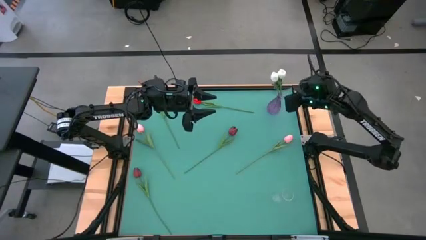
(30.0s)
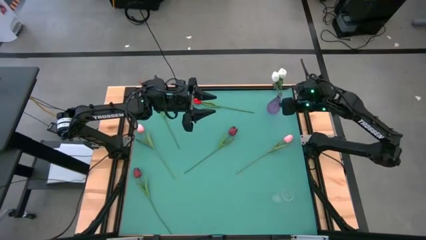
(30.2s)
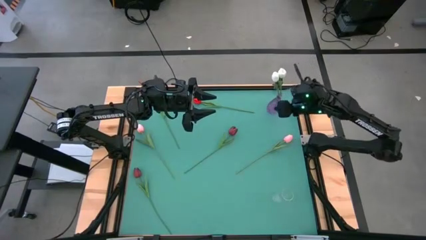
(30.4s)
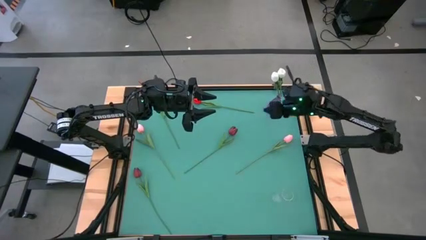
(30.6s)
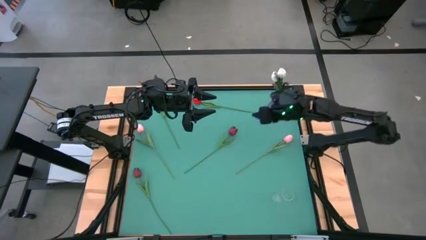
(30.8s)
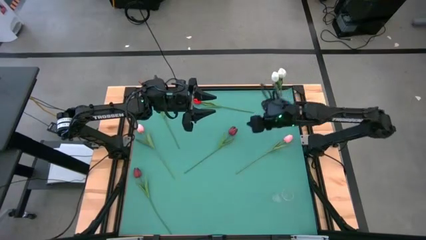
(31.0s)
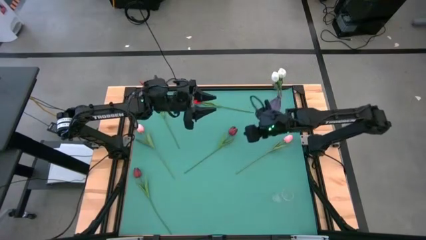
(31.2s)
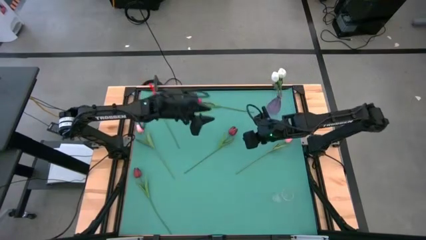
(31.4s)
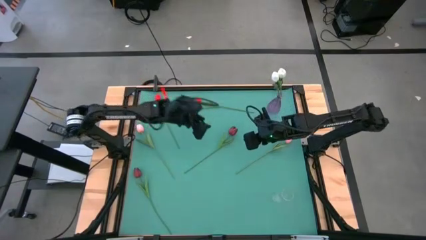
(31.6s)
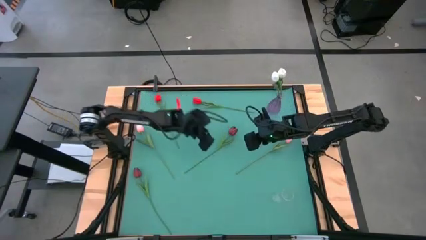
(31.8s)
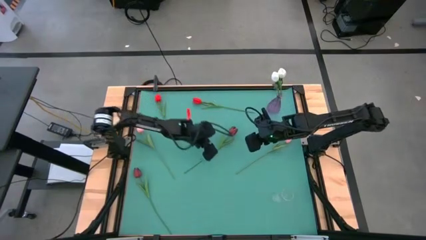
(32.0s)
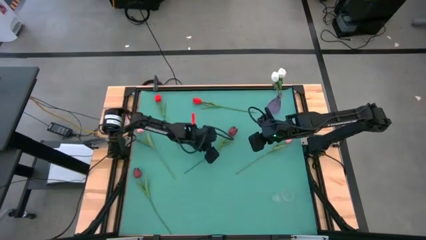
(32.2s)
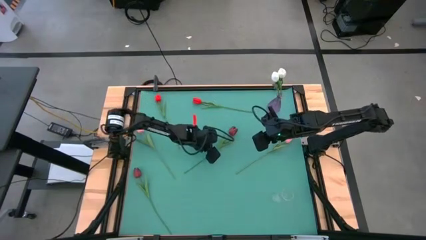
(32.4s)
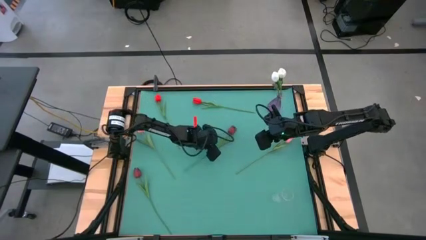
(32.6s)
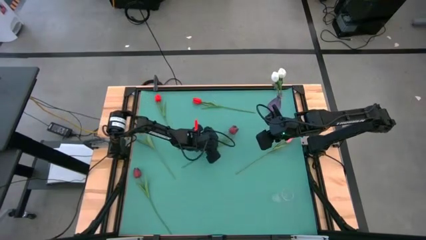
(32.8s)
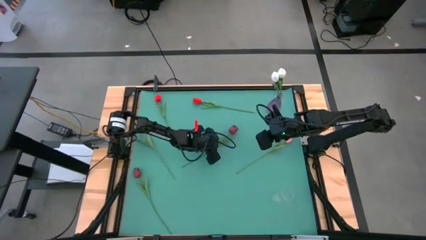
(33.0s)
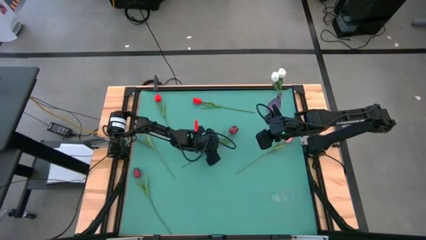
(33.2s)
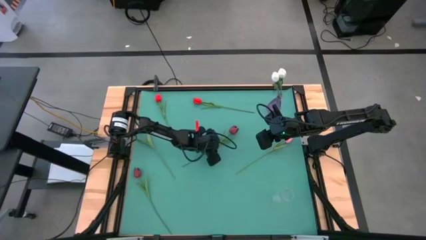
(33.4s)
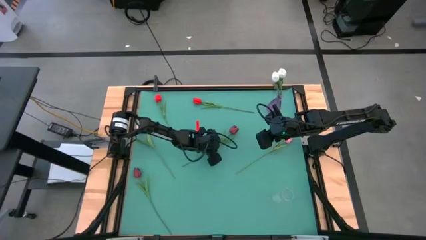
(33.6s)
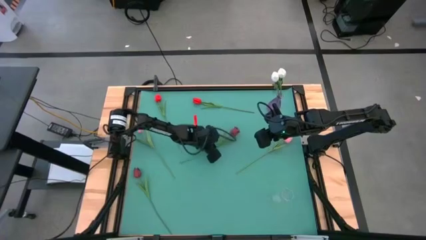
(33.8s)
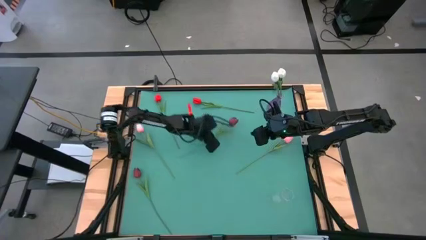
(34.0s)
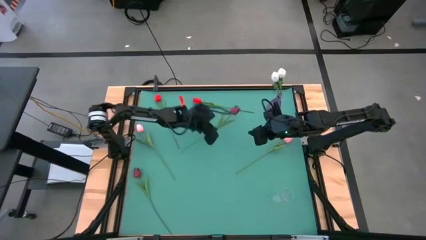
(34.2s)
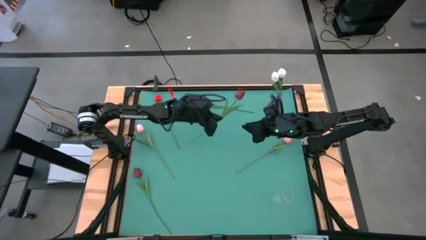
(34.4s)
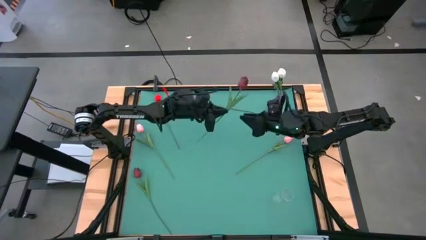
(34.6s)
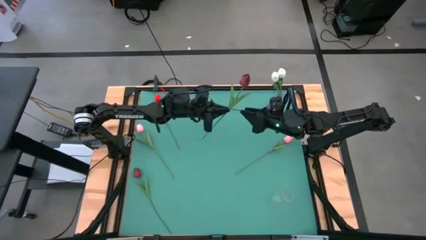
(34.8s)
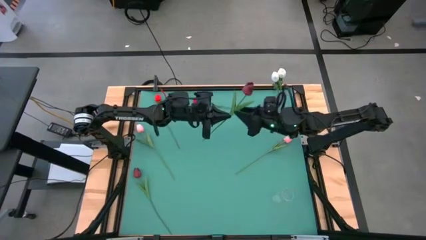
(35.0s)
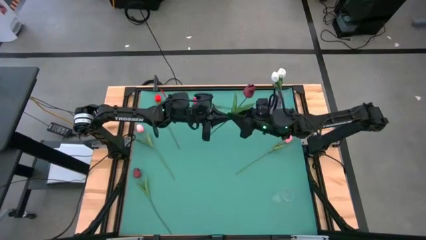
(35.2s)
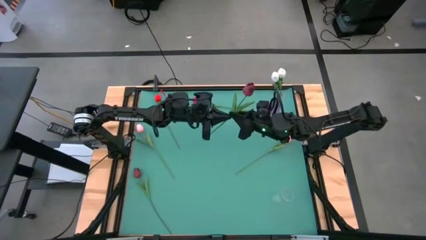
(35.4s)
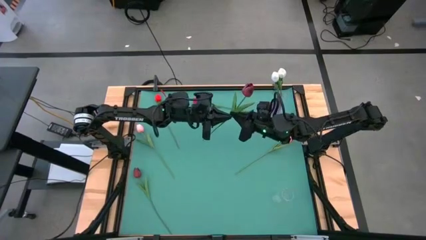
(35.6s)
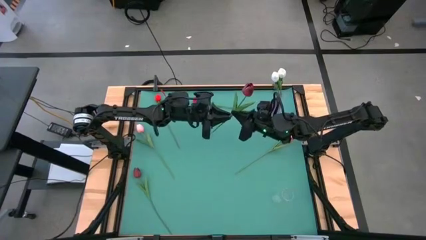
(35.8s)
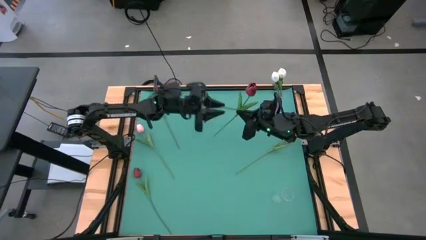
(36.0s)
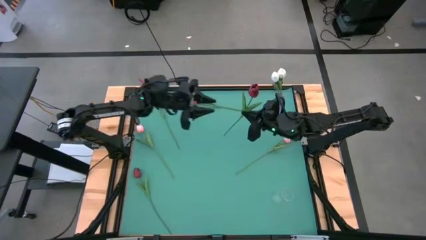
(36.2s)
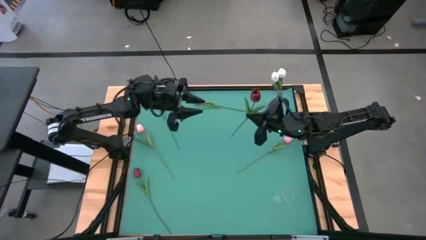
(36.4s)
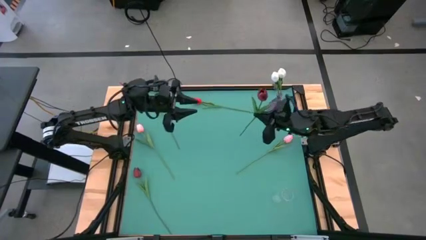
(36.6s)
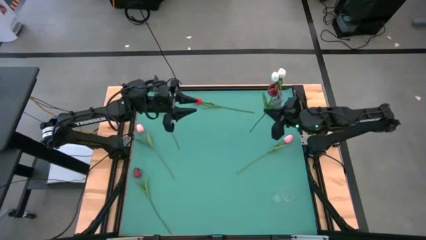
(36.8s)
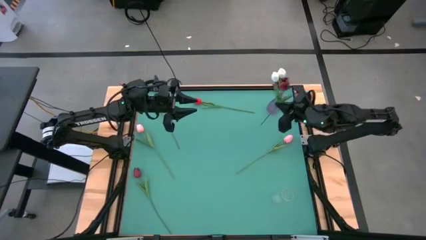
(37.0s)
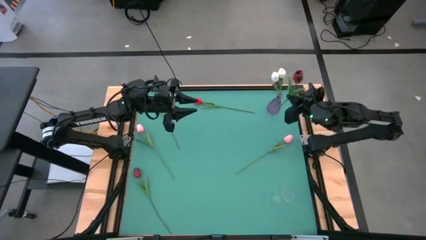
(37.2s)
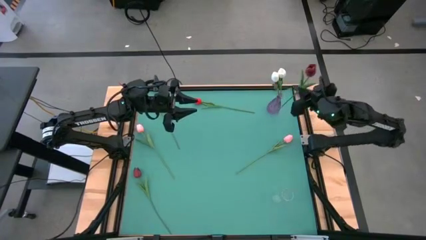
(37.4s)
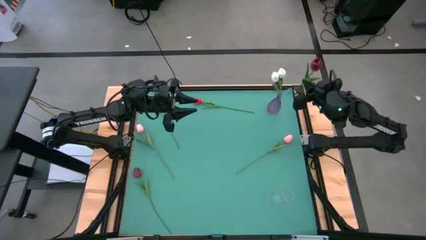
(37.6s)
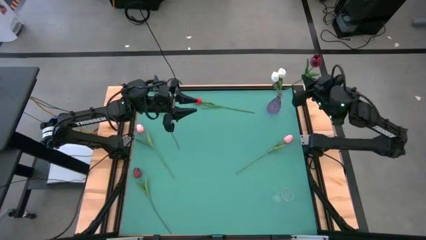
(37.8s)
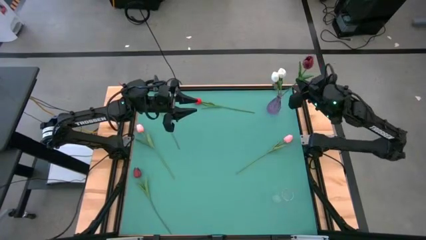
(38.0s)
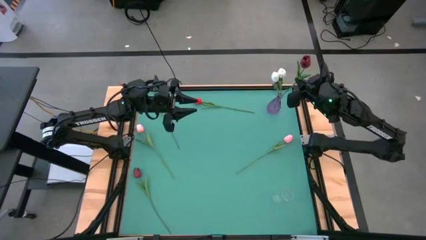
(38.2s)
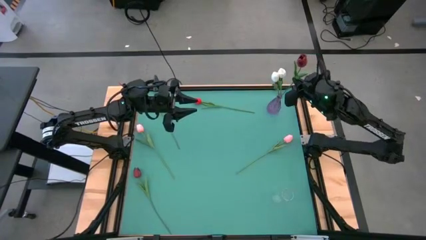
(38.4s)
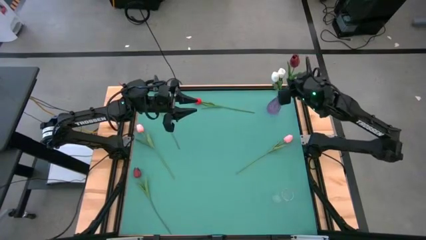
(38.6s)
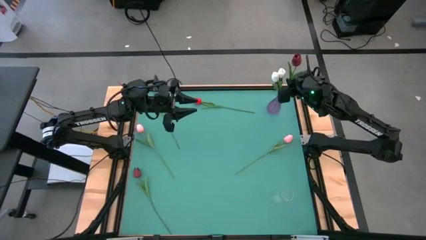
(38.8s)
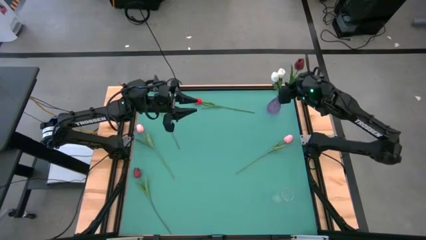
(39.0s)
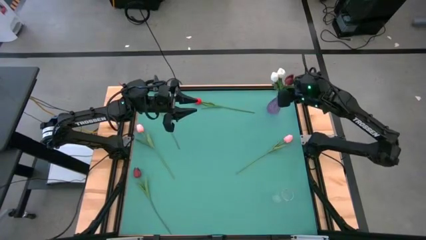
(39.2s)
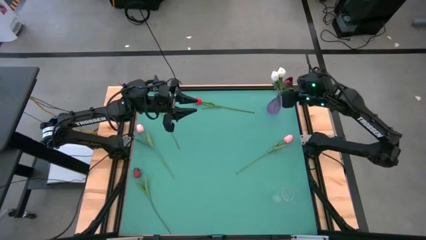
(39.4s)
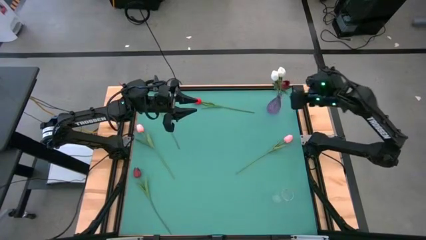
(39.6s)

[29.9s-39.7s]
Task: Sort flowers into vase by color
Put the top dark red flower into the violet vase

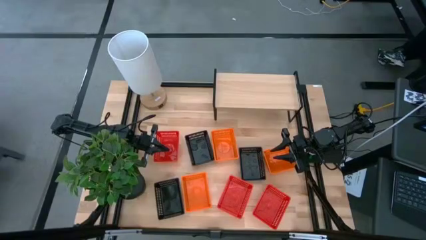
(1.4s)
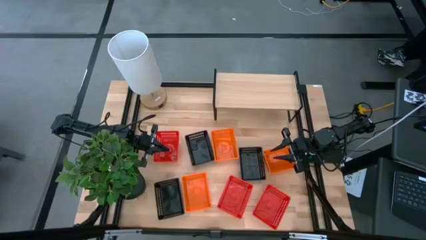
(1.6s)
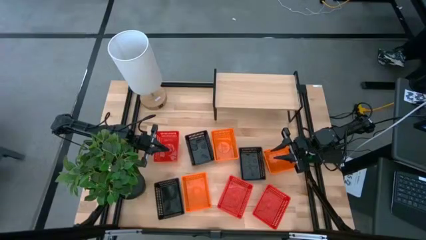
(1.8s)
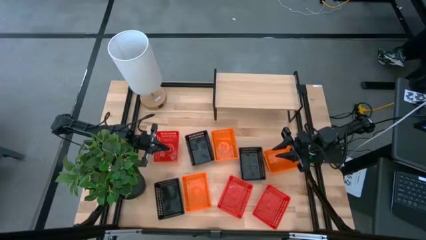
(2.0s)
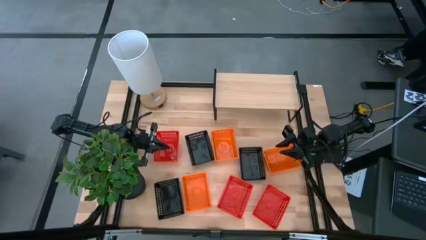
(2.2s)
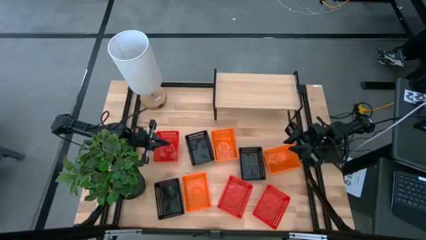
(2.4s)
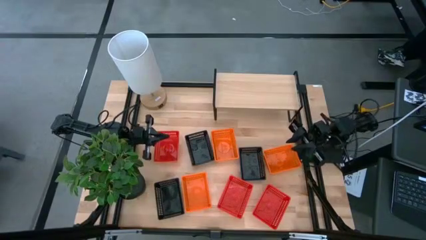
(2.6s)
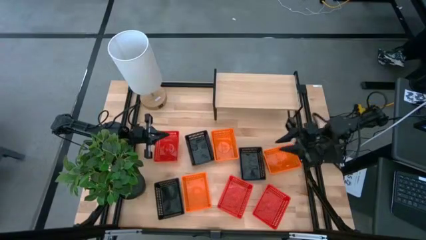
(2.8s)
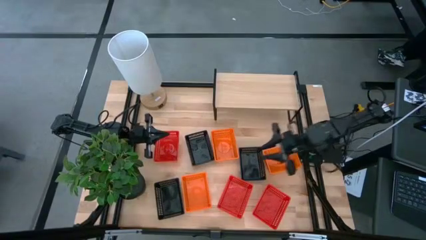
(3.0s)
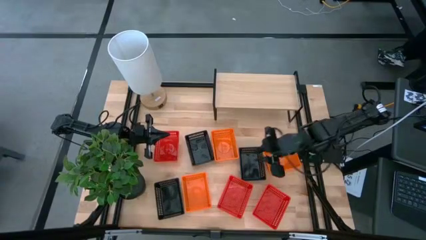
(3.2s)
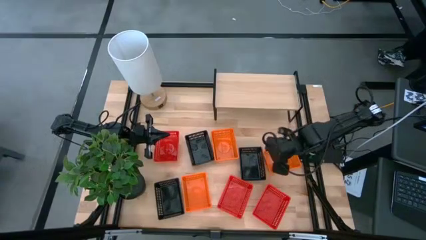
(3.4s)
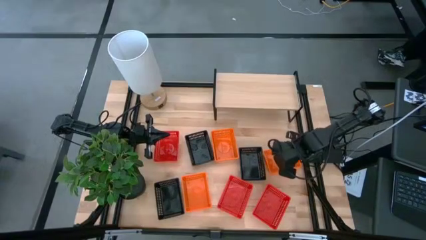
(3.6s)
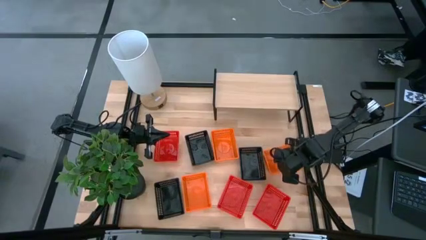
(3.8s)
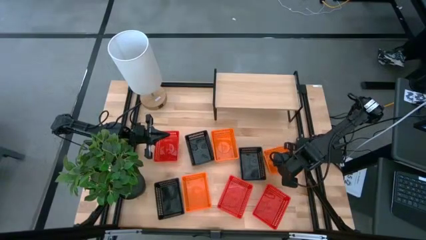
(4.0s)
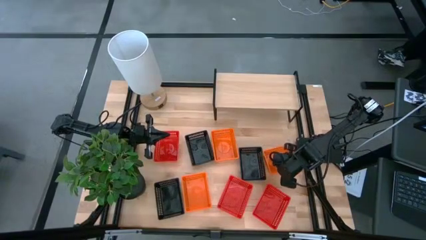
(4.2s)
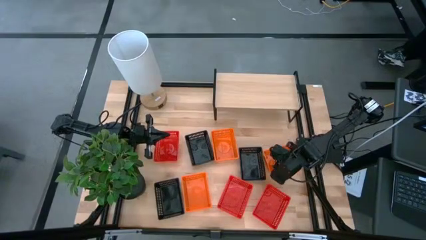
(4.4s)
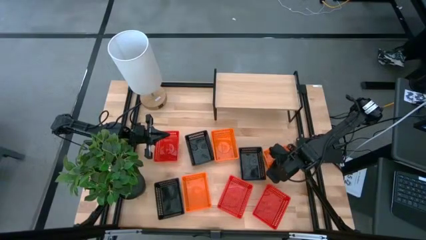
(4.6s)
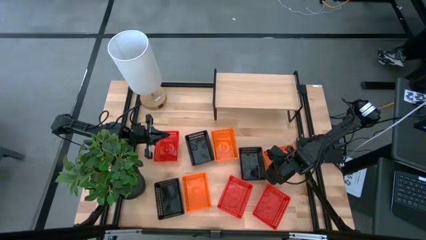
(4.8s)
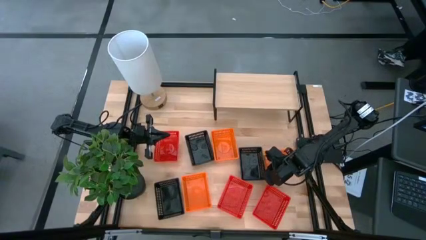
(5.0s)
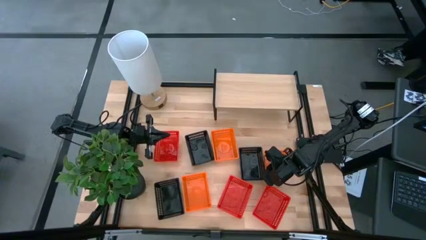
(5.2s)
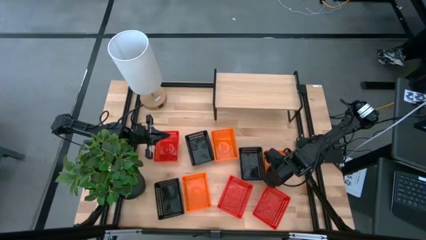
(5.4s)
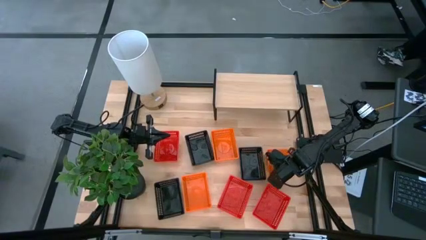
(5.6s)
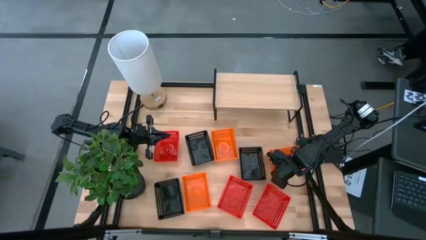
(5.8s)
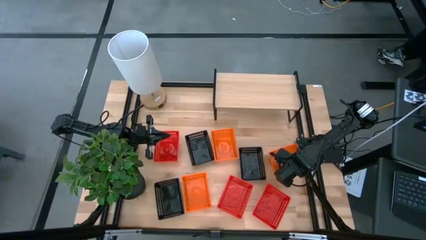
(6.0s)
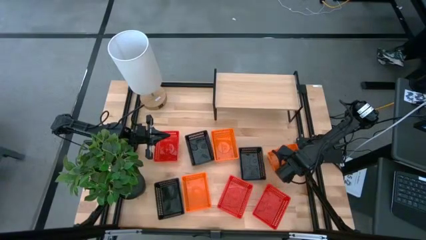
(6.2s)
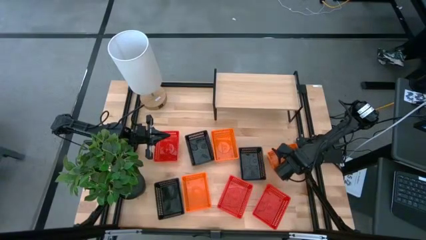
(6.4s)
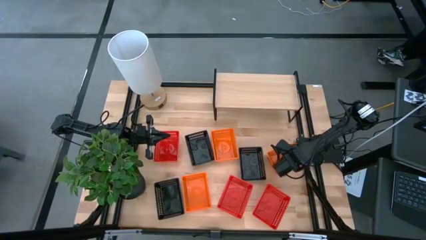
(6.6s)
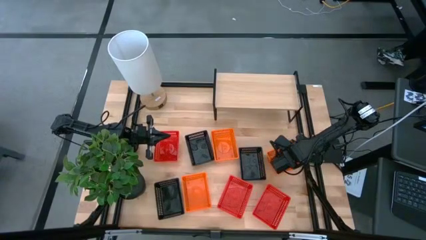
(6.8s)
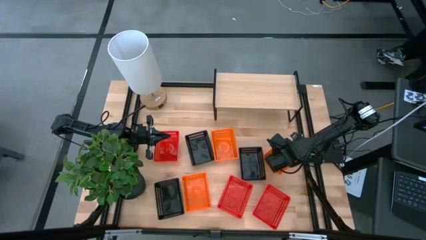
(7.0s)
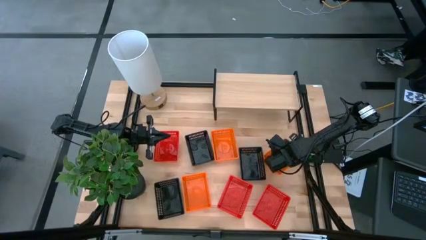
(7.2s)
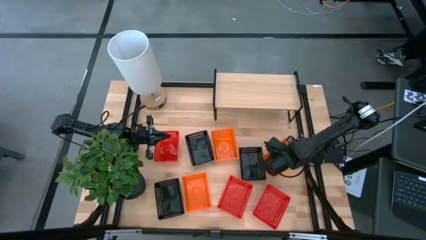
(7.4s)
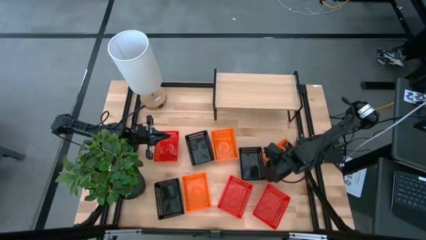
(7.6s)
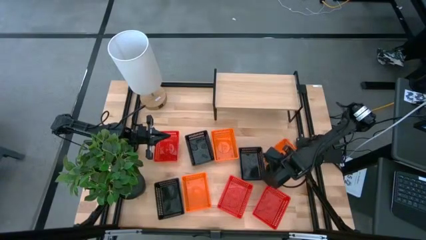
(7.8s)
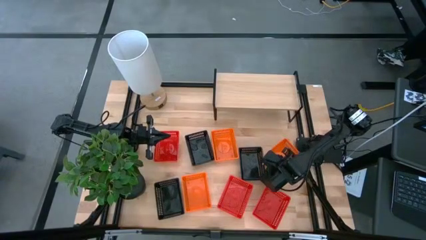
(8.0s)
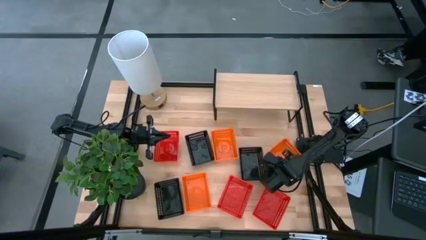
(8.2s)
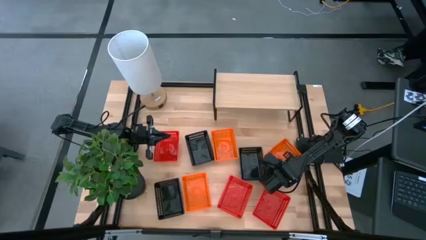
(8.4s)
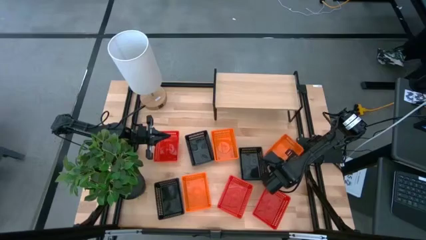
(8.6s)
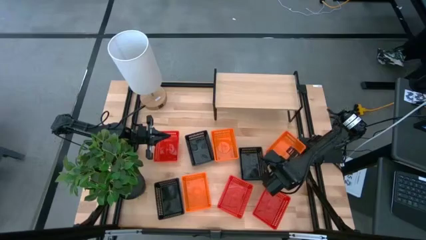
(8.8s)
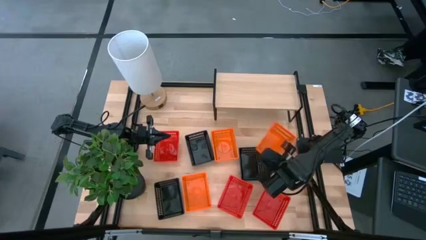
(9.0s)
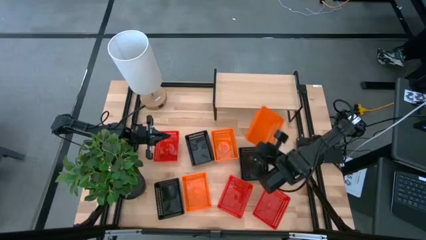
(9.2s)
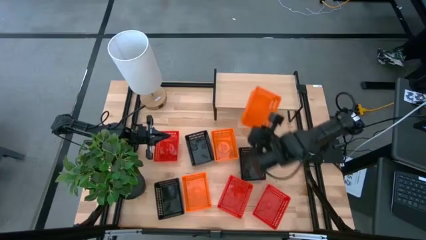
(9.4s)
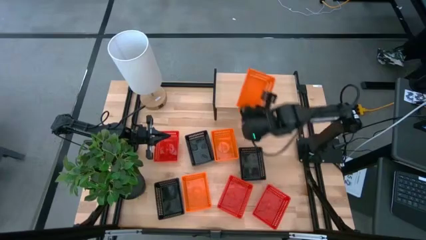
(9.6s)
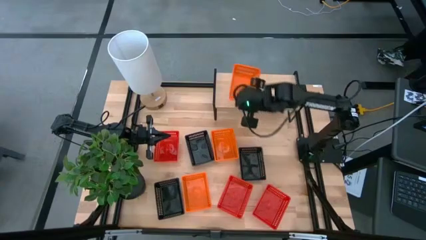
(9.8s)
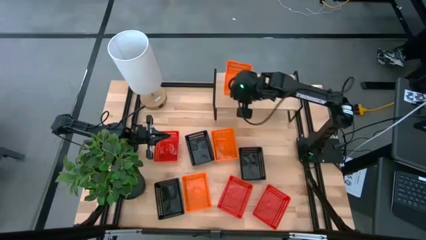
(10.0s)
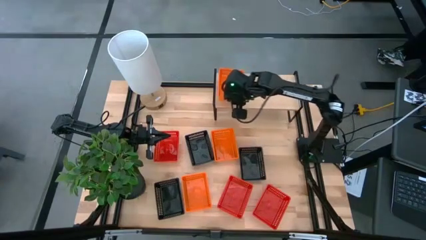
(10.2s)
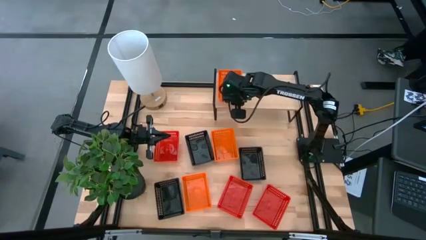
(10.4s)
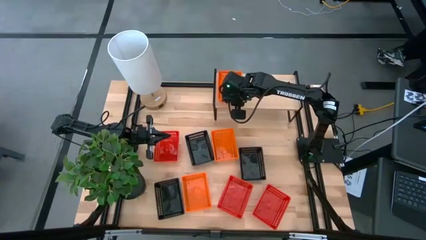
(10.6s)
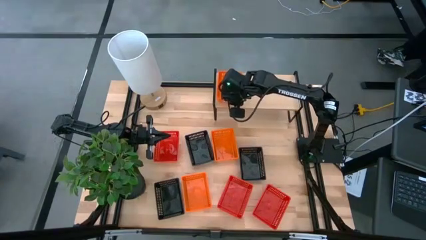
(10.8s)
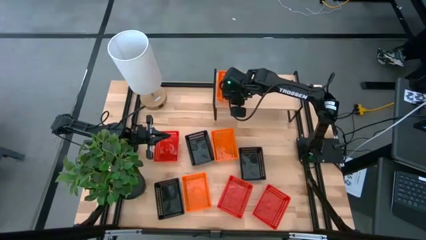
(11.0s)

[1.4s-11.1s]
Task: Stack baskets on shelf by color
Put the top right orange bin on the shelf
